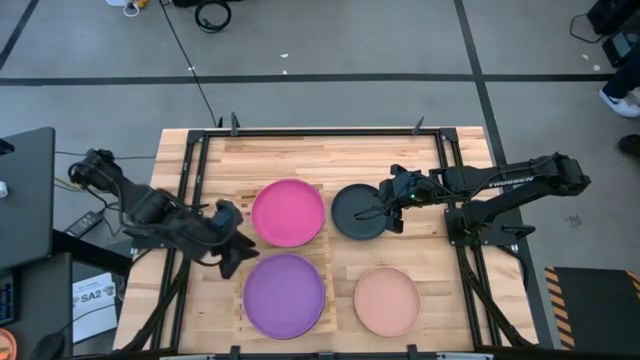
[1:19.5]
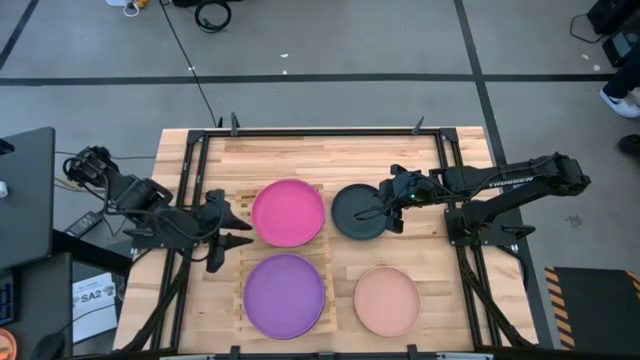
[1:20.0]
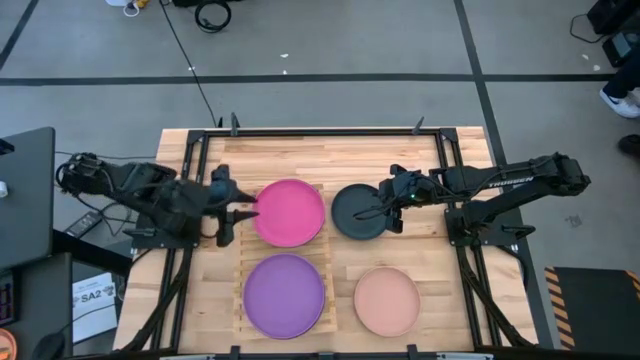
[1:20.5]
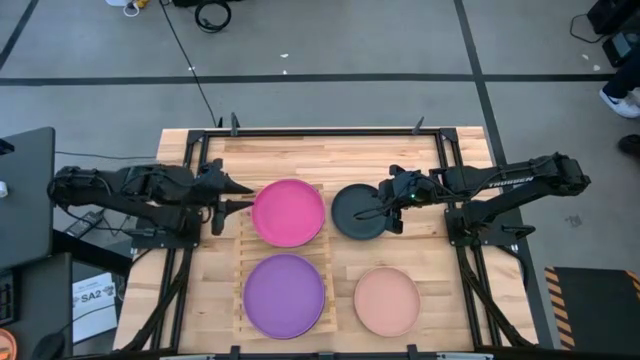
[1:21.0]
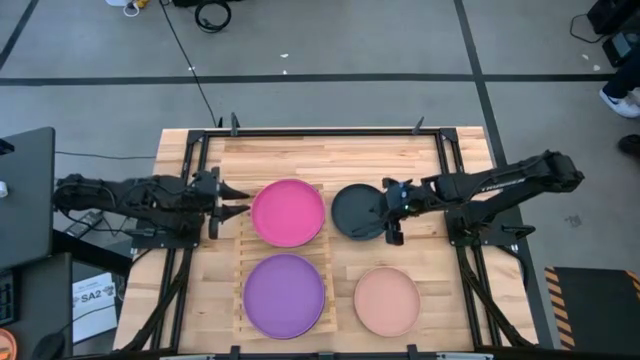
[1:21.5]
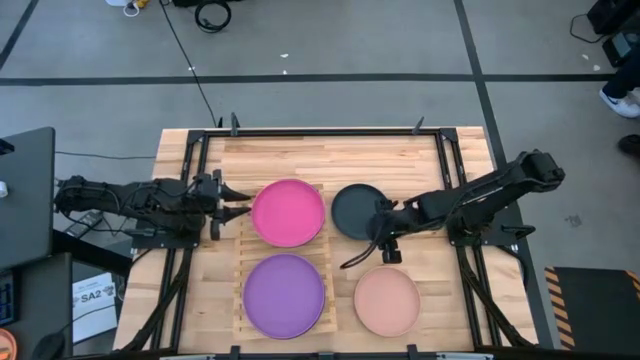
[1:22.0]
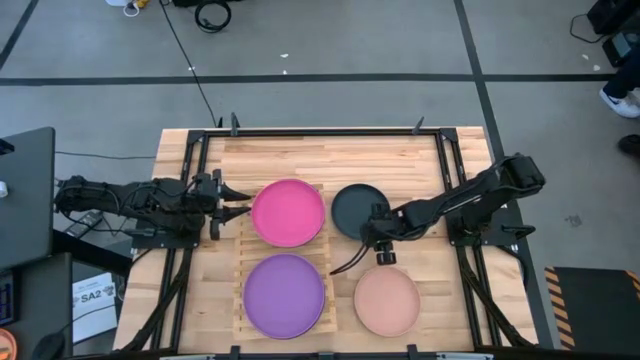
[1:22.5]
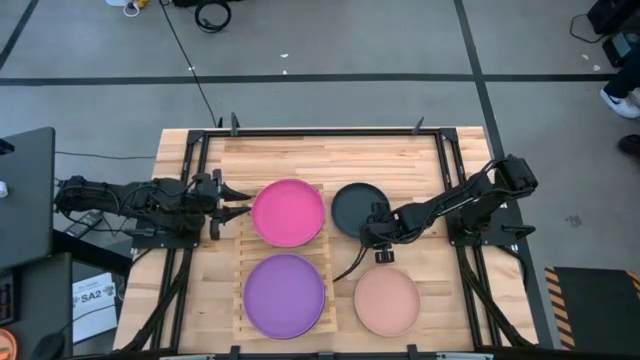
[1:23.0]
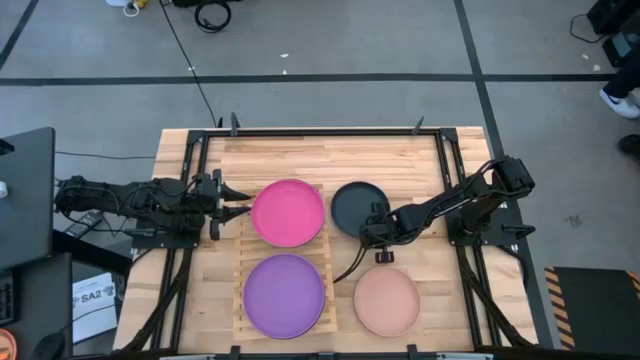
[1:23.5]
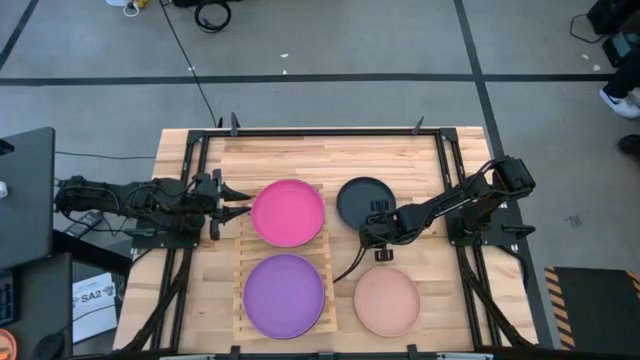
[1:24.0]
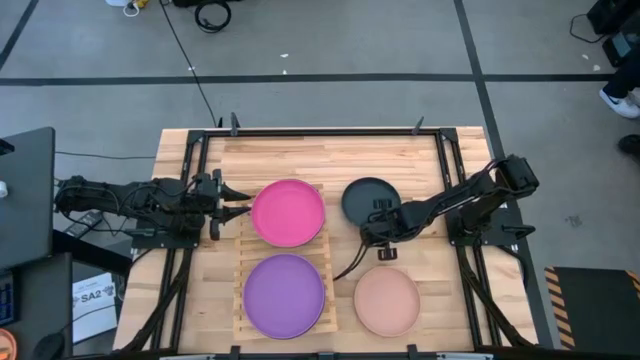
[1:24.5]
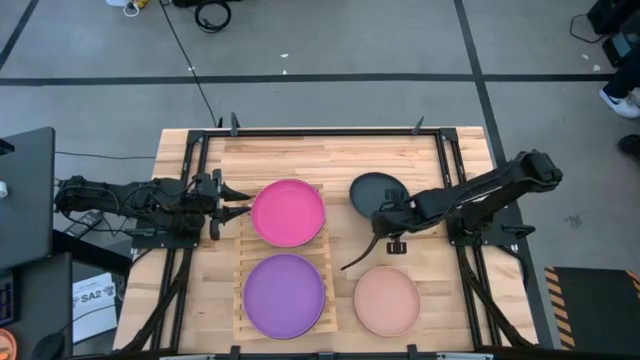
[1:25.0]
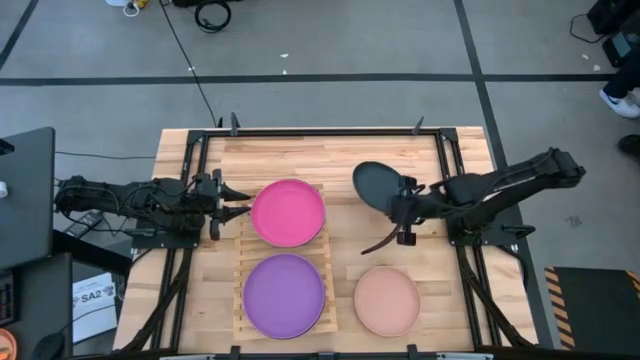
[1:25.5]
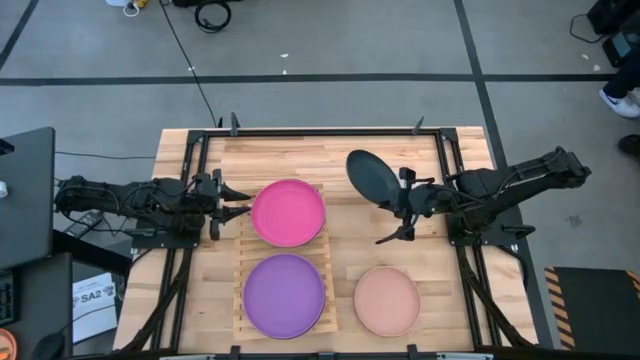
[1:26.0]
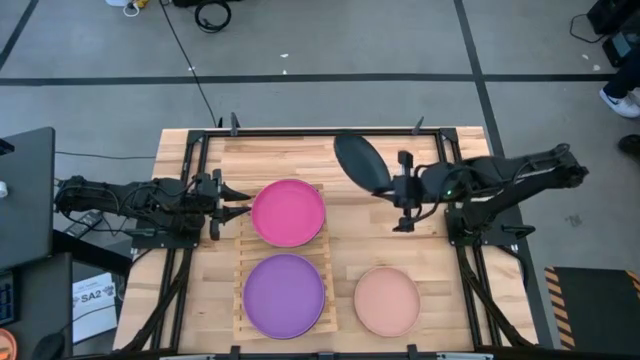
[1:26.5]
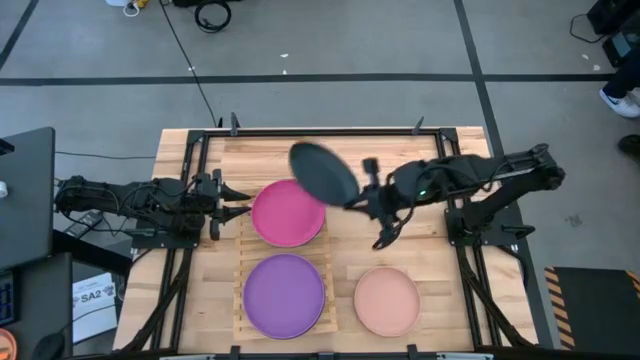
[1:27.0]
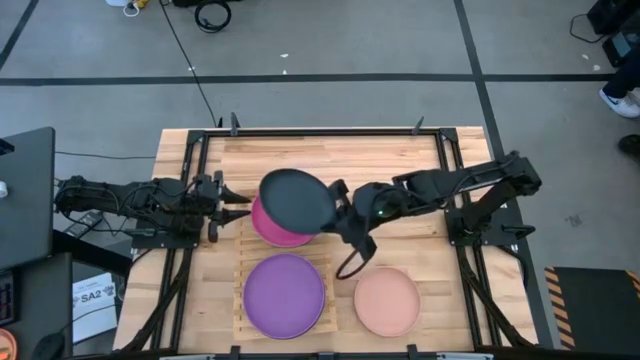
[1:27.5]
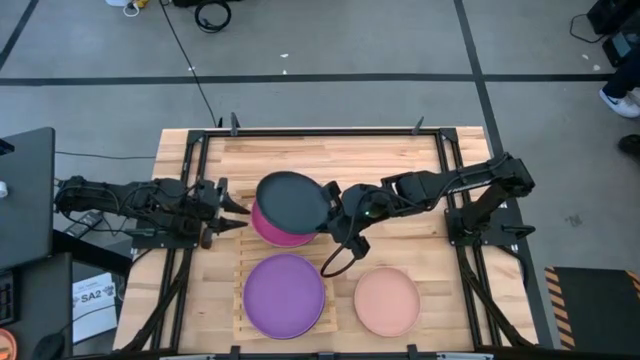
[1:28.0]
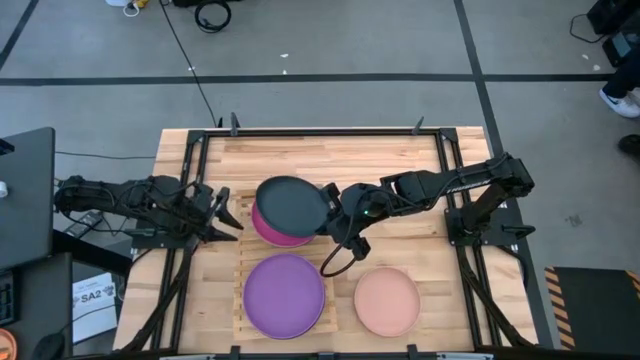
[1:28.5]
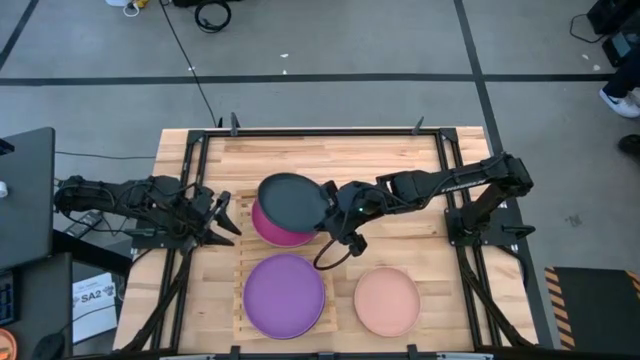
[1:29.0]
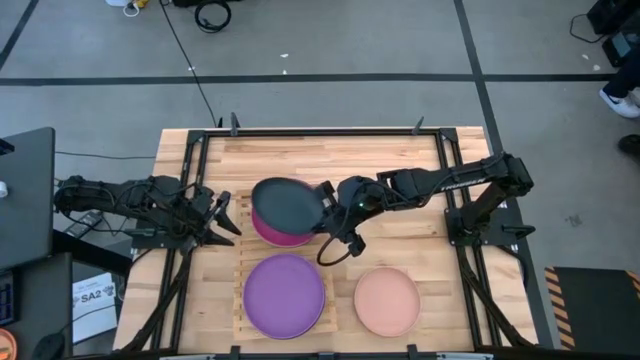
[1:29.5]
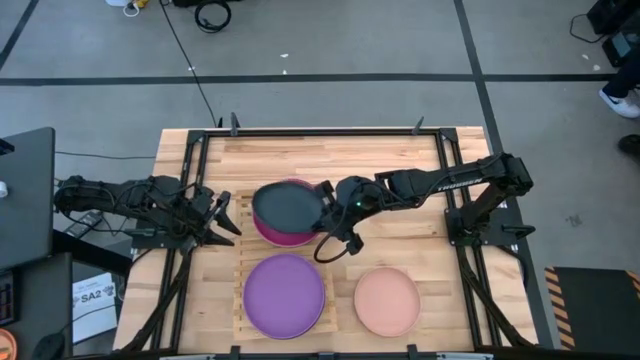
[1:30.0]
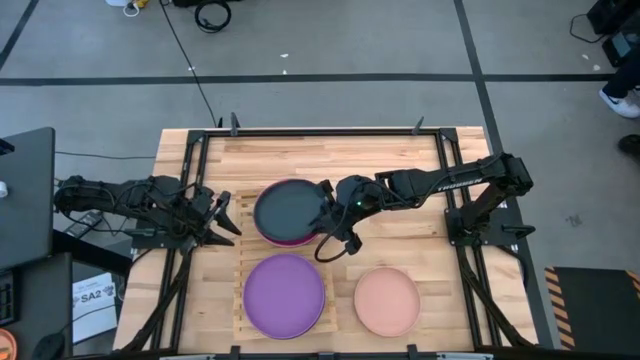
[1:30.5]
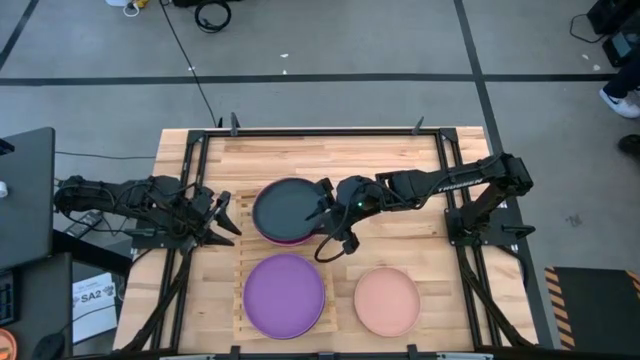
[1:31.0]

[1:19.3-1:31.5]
Task: Place and stack plates onto a shelf
Stack the black plate on top of the pink plate on the shelf

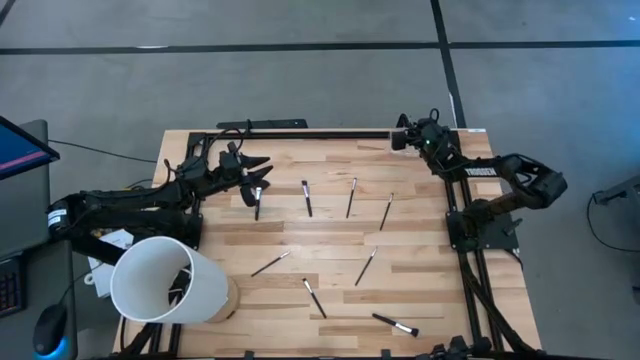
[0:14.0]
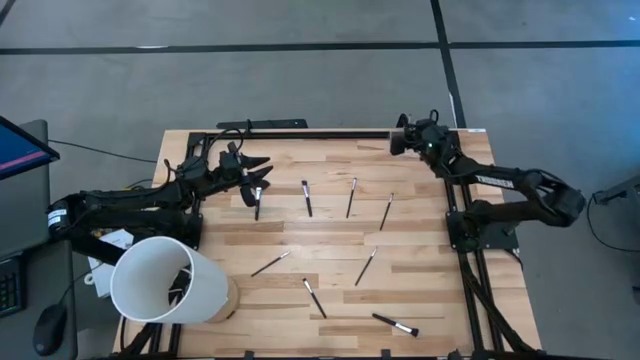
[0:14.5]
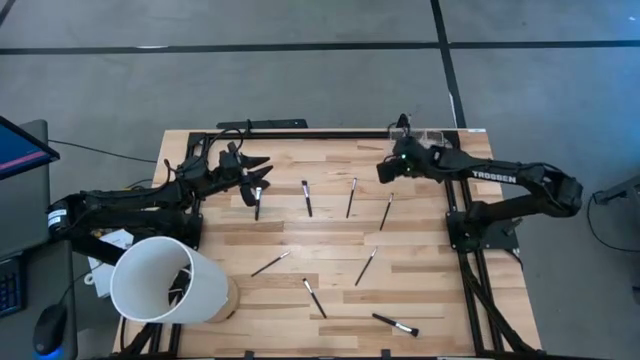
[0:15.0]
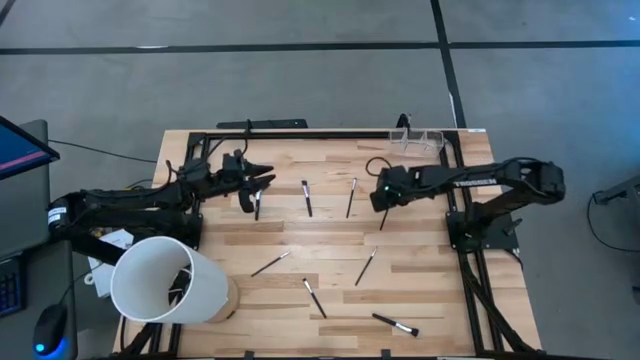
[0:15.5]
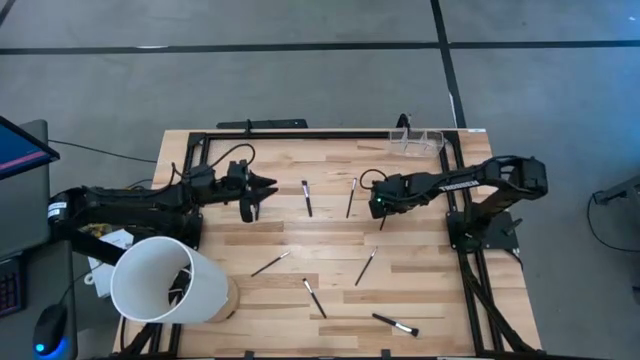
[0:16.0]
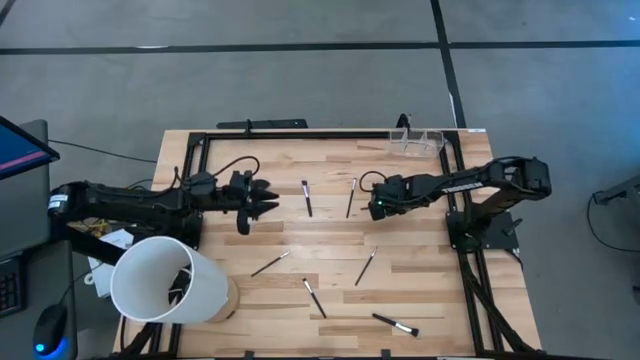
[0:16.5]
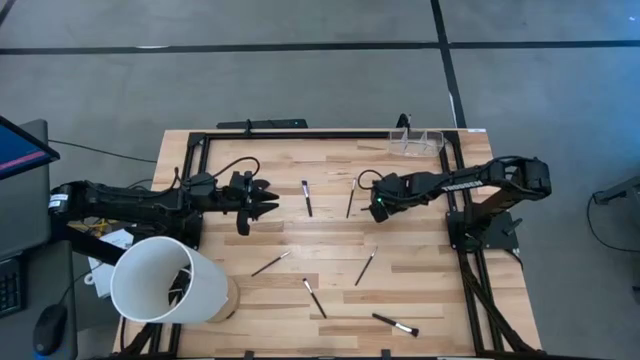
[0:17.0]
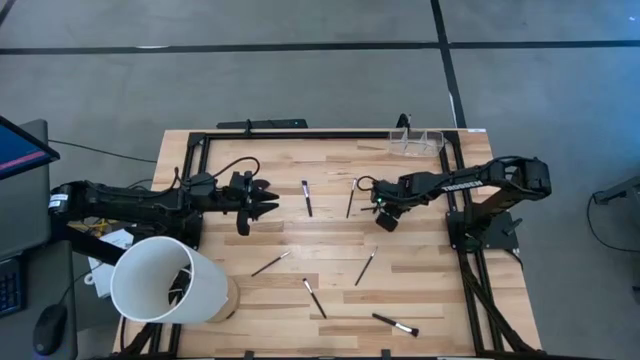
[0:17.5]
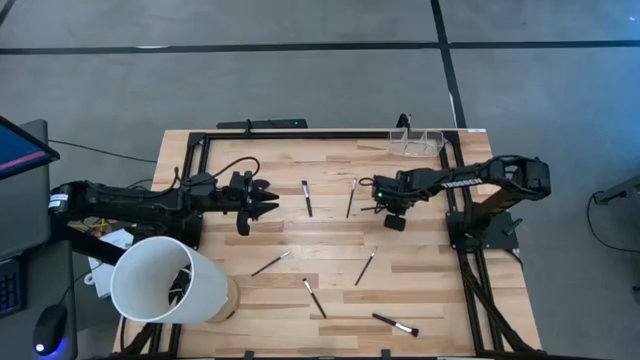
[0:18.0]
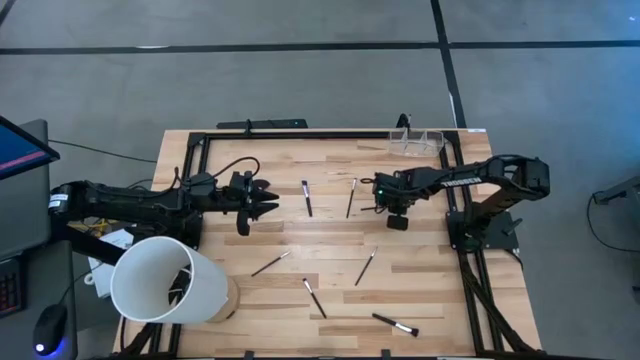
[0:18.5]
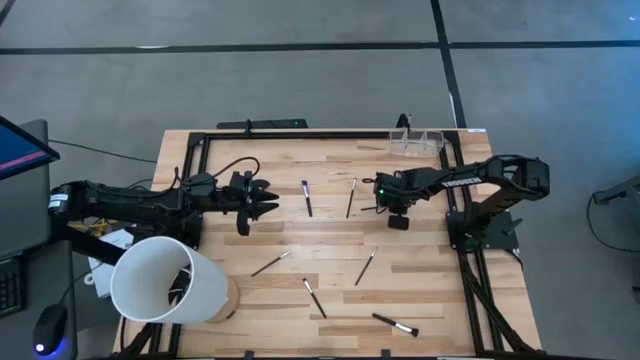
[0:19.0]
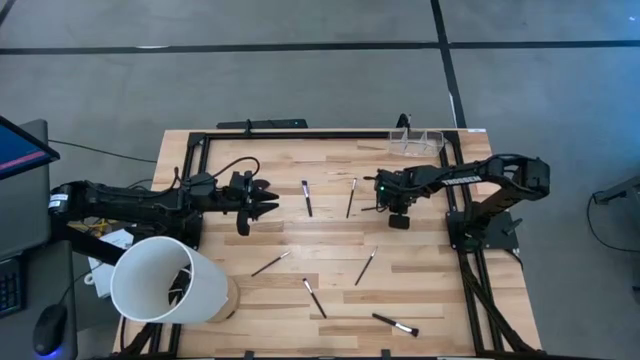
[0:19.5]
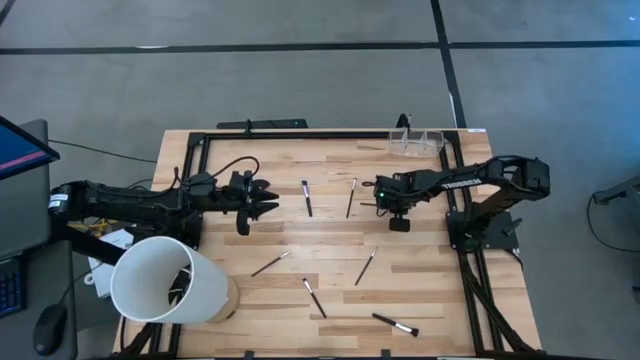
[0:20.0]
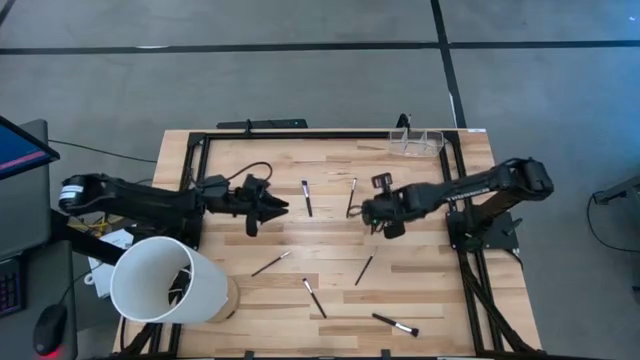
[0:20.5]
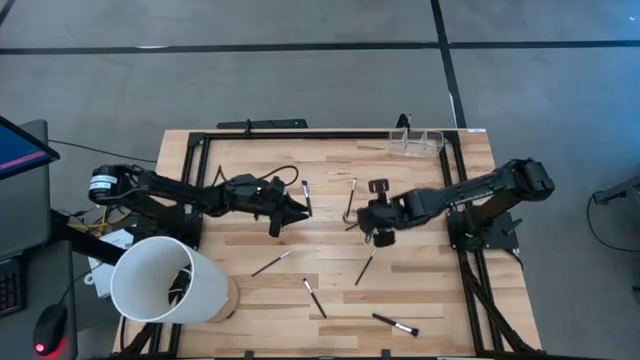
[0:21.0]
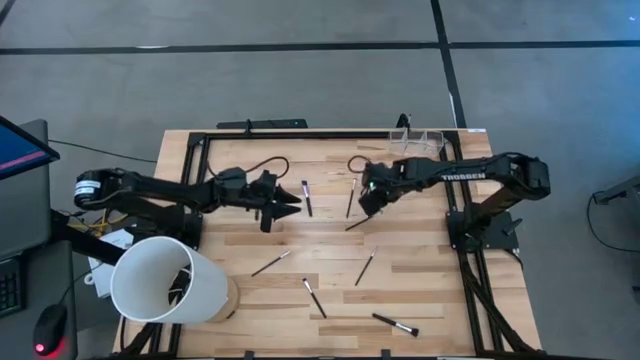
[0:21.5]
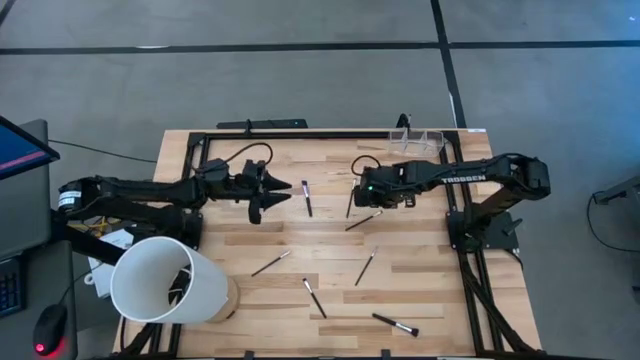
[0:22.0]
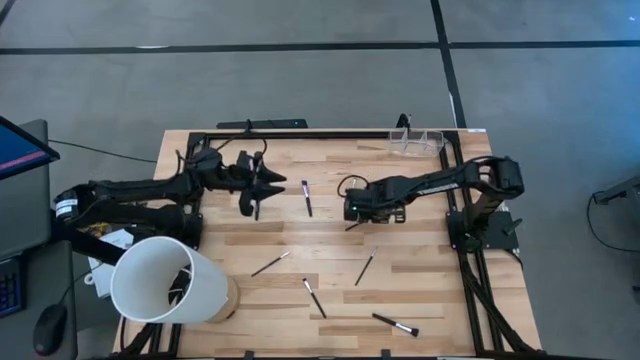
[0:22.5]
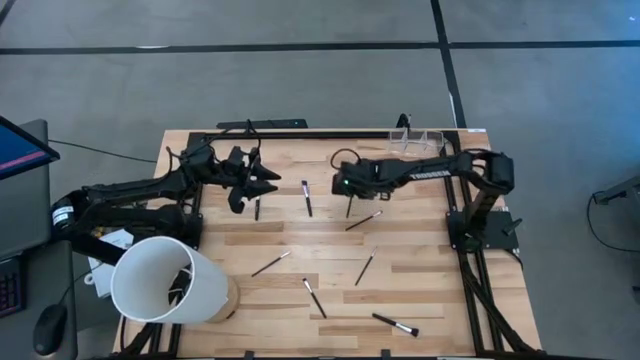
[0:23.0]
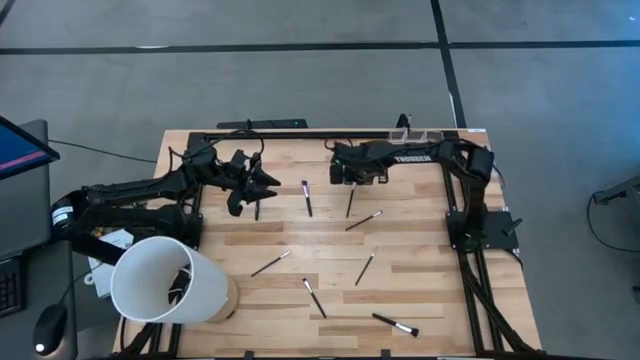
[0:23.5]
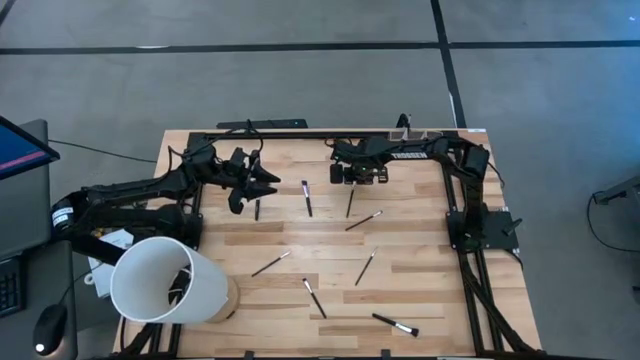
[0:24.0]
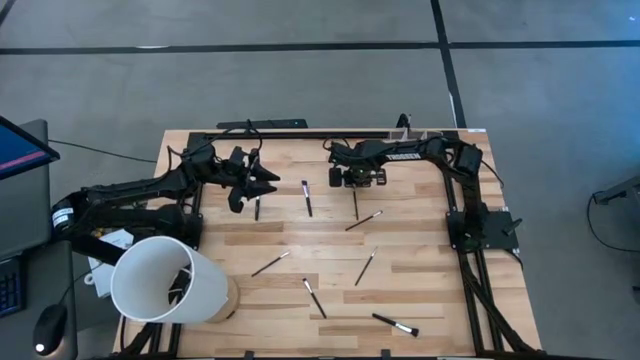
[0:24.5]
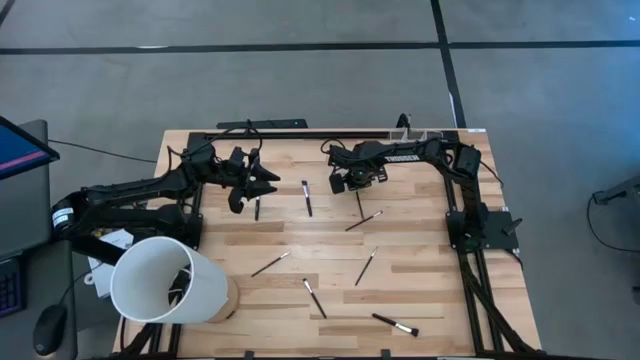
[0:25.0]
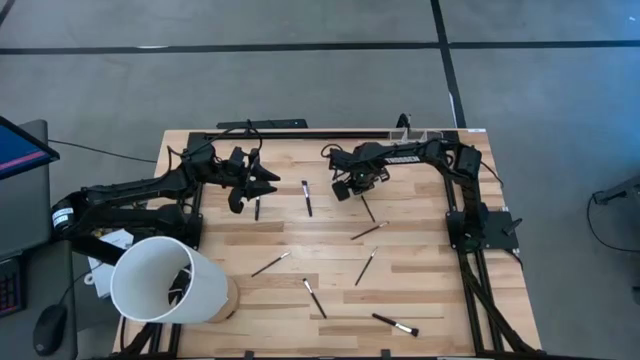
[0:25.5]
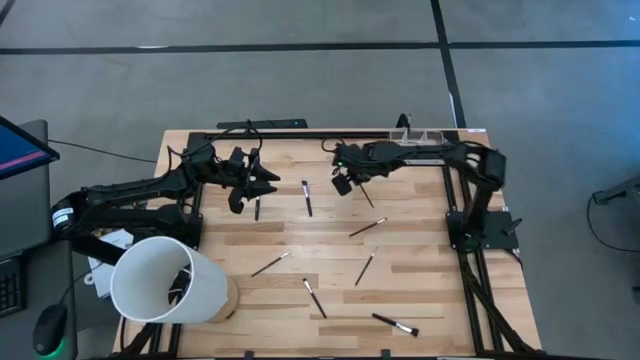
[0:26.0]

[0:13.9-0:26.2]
Task: Put items in baskets/containers
Put the black eyeshadow brush into the middle section of the transparent organizer
